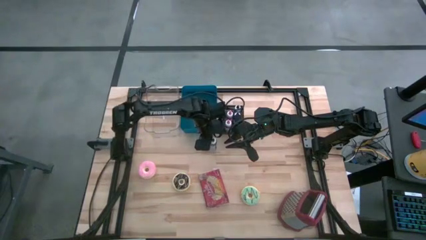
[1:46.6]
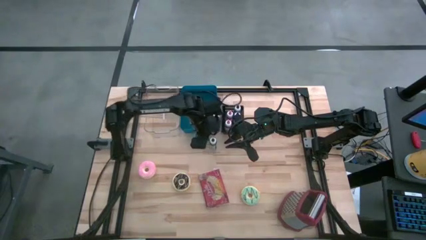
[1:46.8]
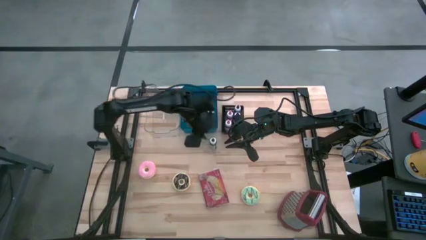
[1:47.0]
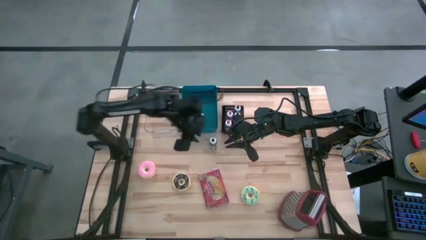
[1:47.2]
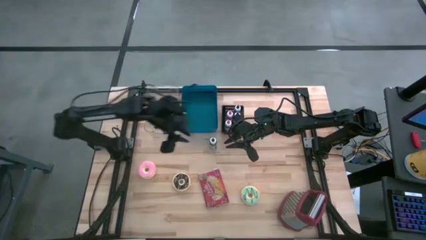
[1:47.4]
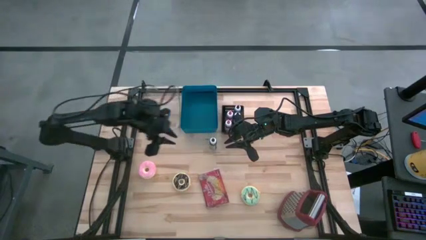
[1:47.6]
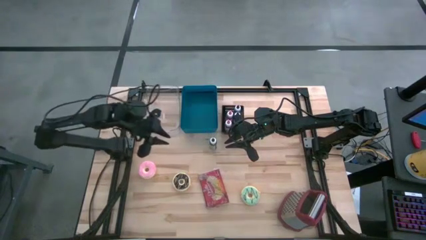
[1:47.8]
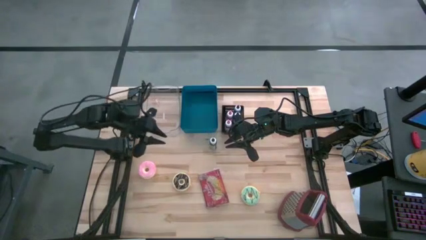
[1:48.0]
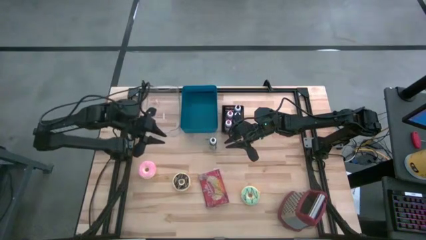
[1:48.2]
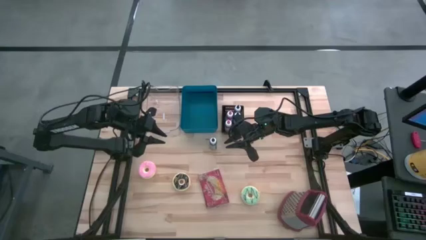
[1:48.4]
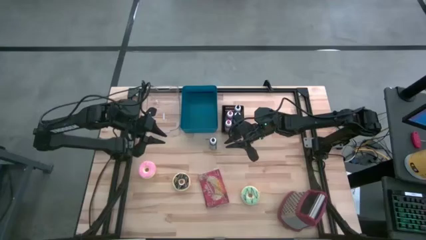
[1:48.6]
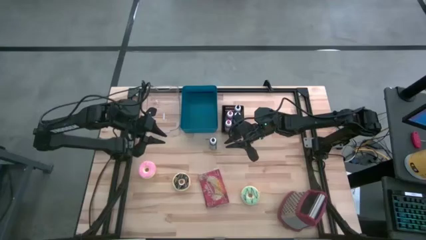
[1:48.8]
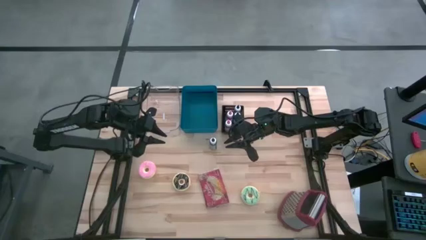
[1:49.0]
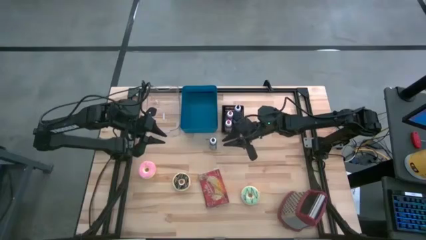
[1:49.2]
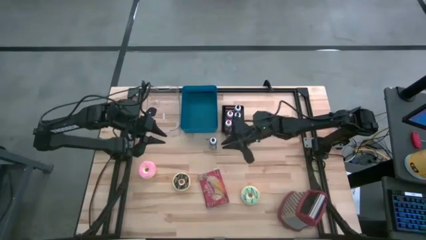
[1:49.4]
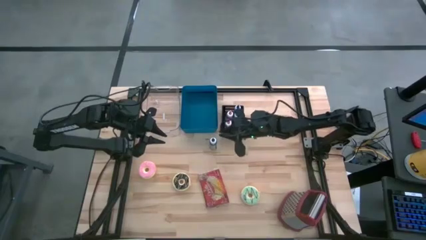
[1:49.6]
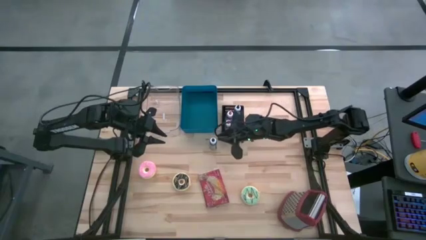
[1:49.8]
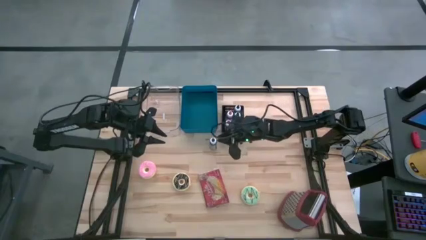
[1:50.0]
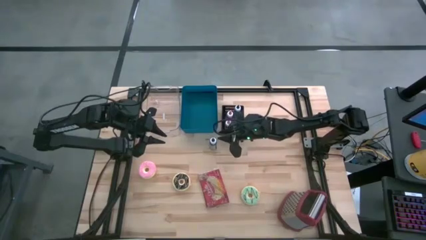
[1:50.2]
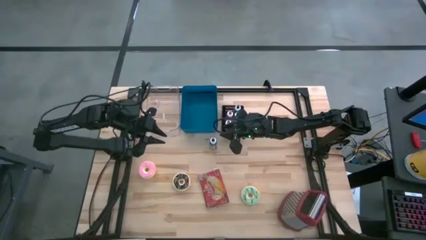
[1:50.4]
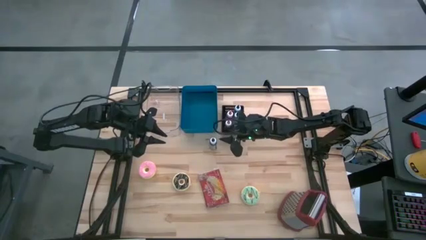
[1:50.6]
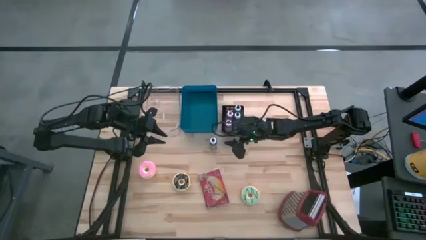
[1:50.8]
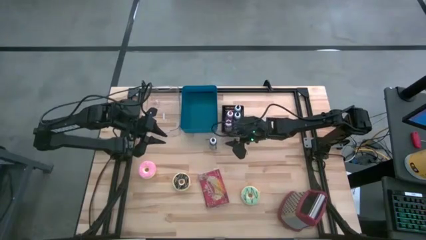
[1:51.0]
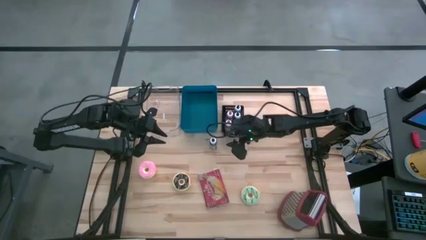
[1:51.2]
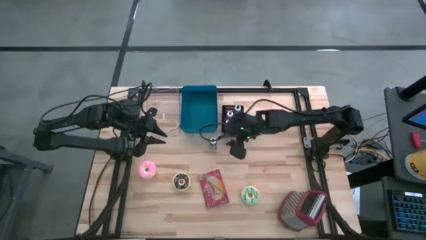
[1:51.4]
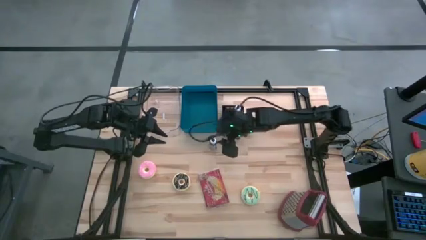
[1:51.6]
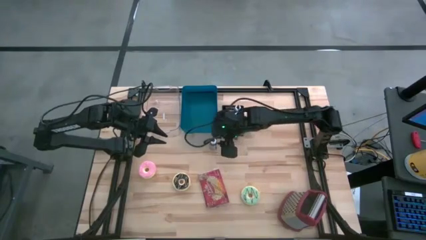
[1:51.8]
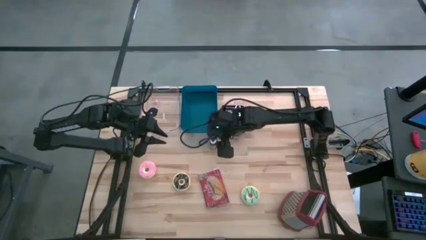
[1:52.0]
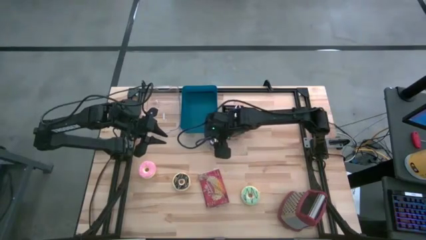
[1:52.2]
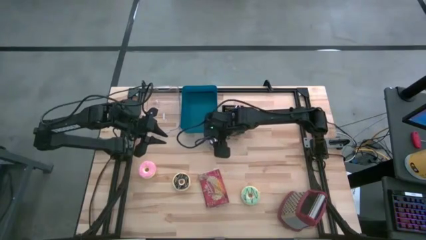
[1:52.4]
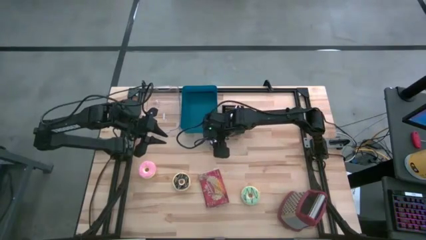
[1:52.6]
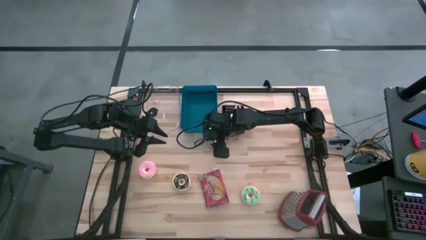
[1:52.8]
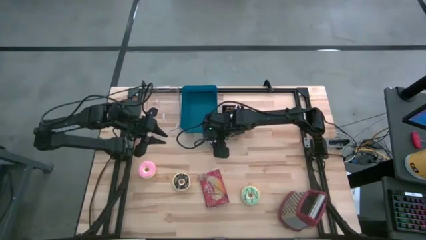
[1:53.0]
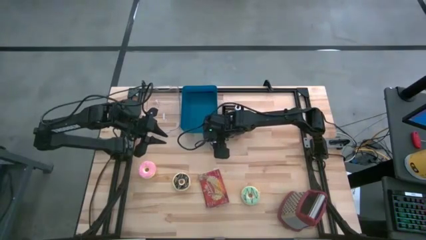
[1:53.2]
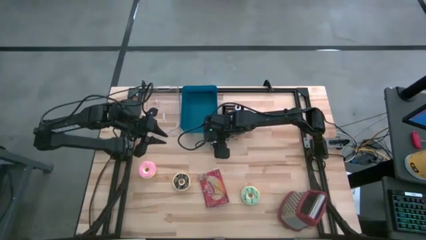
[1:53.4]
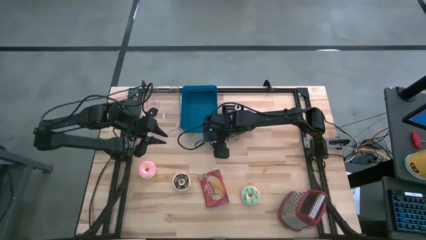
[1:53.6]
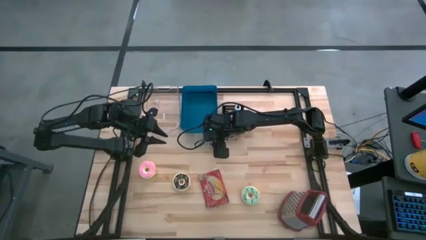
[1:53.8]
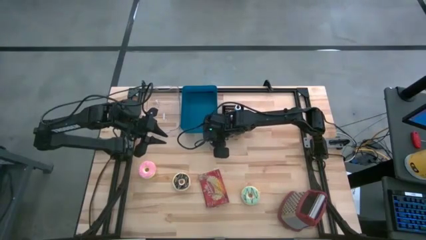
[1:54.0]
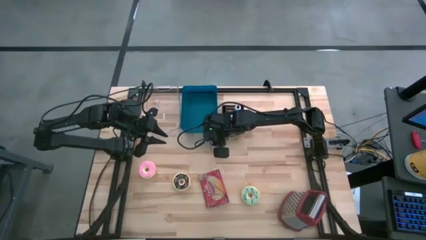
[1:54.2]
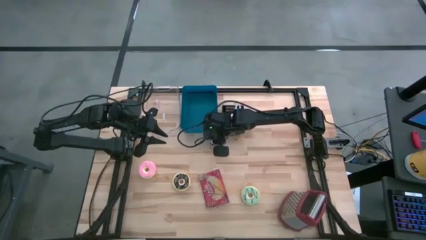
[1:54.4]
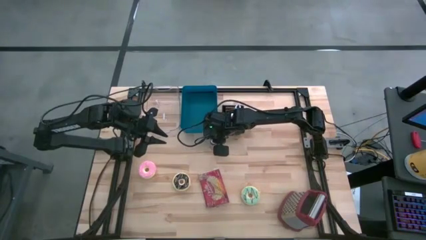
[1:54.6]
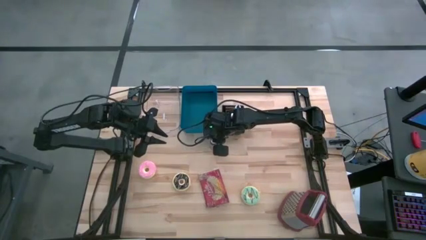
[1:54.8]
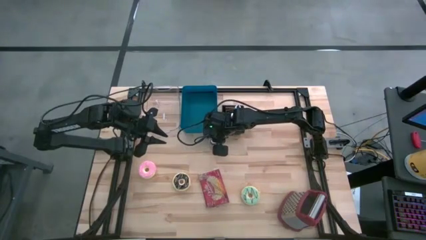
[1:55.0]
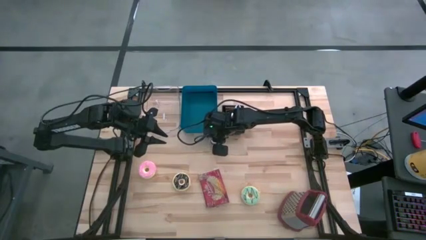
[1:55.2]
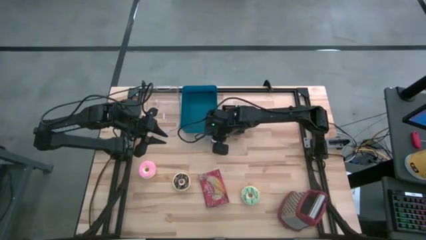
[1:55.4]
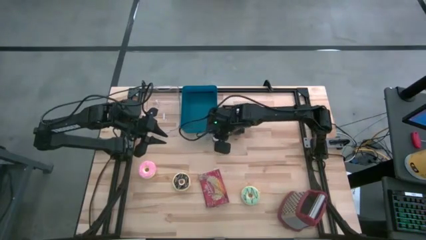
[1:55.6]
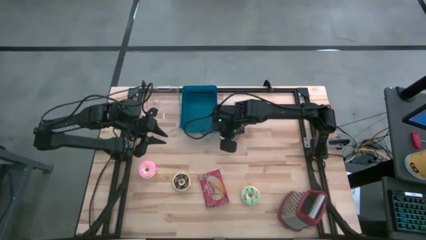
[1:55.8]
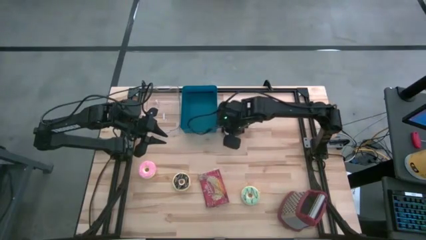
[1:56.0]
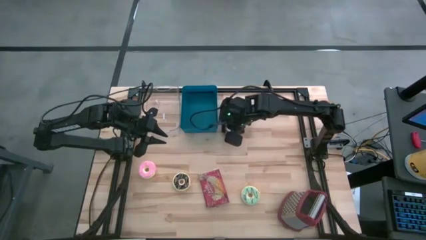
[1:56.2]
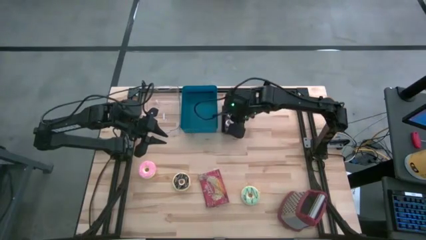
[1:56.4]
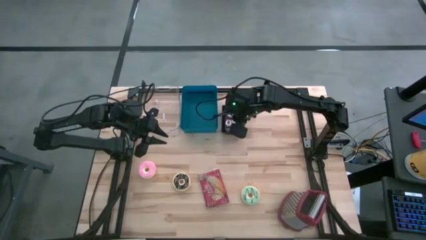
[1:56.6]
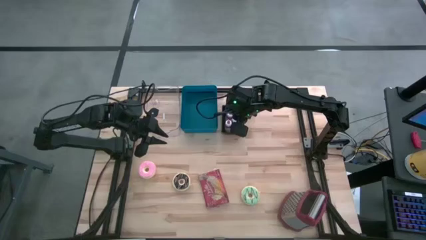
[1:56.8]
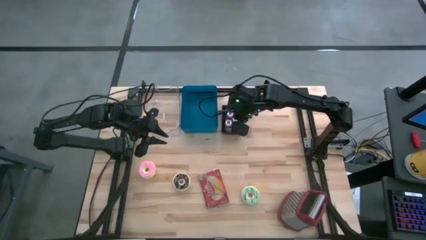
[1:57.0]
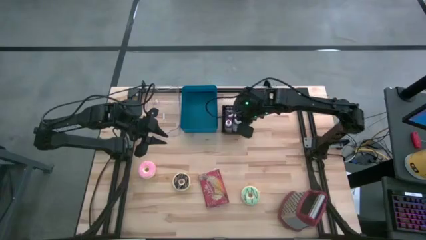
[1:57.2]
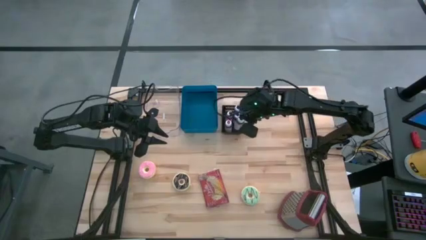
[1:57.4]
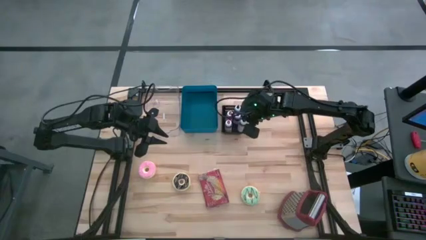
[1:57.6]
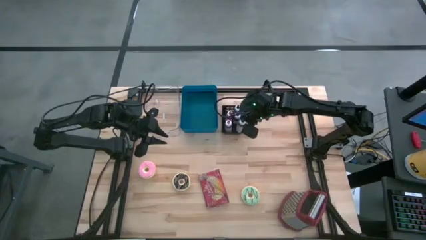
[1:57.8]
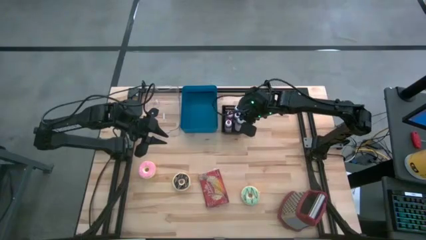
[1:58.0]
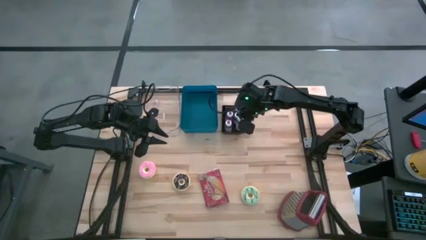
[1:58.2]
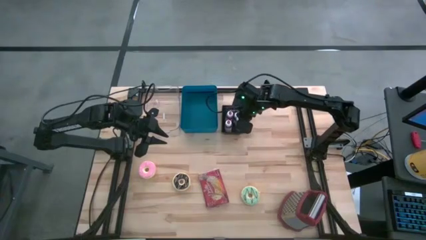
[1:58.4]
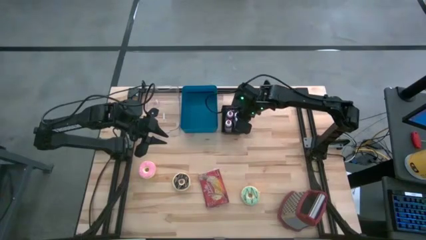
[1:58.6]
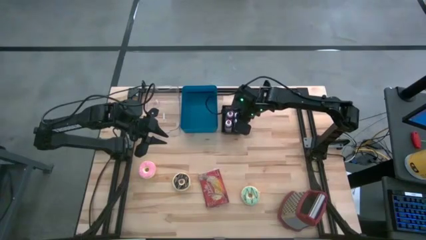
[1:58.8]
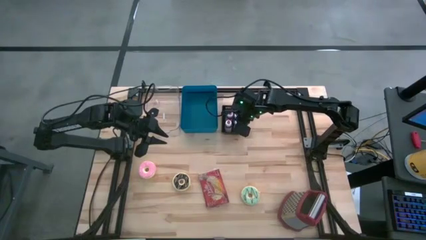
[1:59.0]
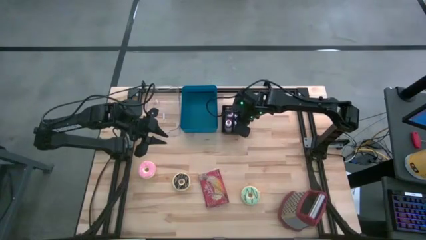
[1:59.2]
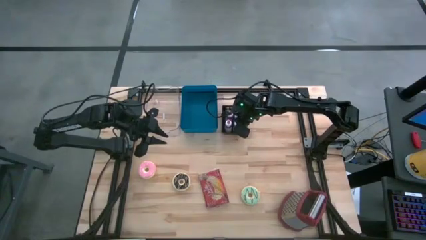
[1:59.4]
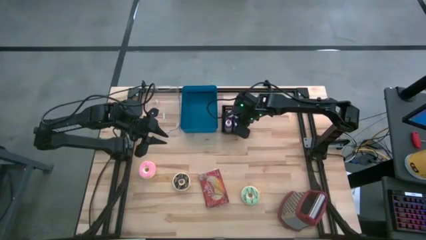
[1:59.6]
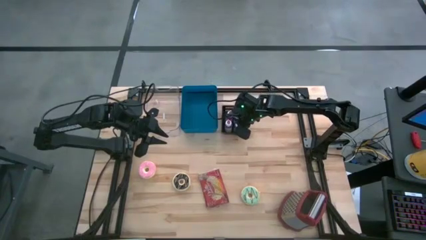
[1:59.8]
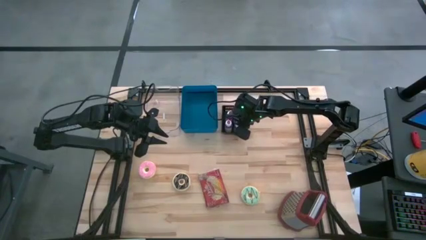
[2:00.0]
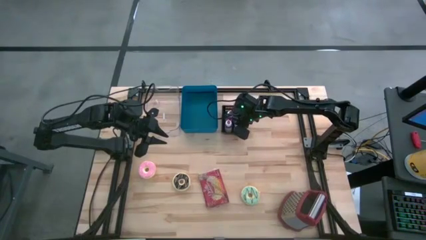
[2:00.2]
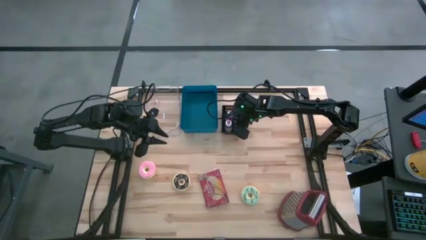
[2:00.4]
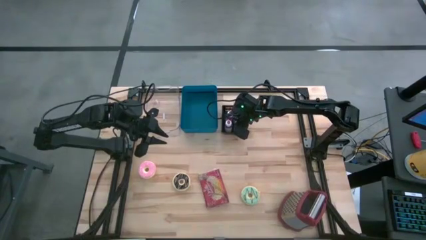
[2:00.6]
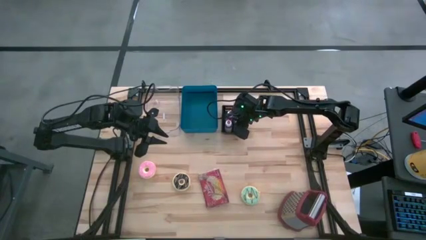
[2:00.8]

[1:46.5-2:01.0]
Put the black food coloring into the black bin
